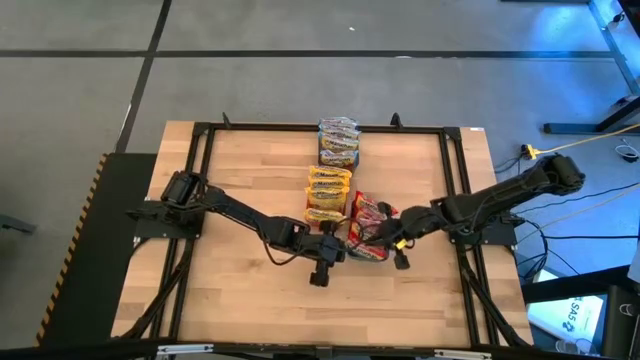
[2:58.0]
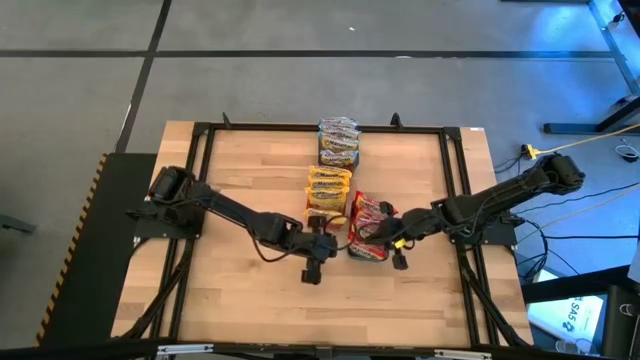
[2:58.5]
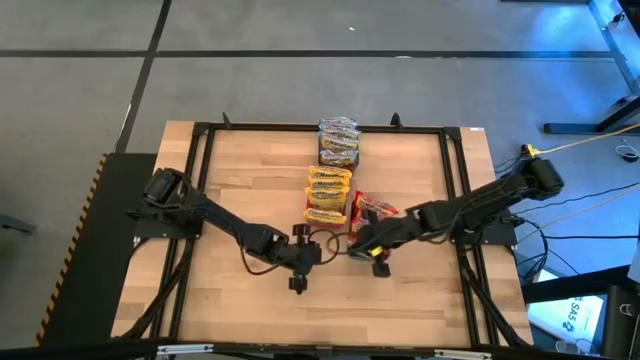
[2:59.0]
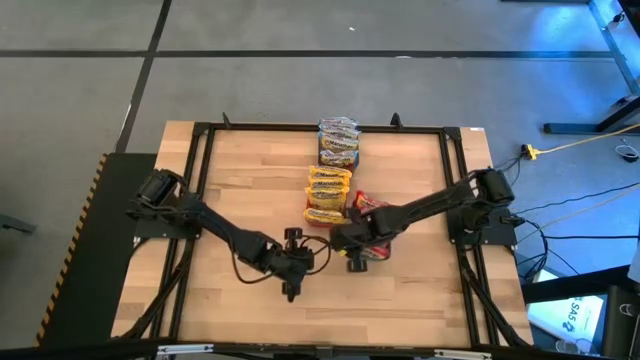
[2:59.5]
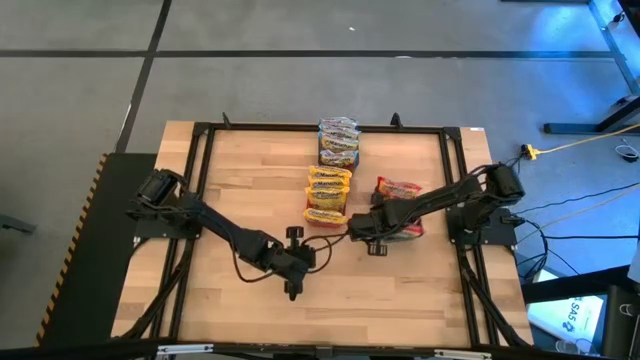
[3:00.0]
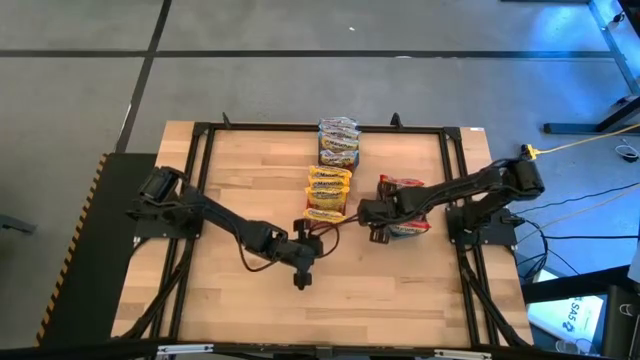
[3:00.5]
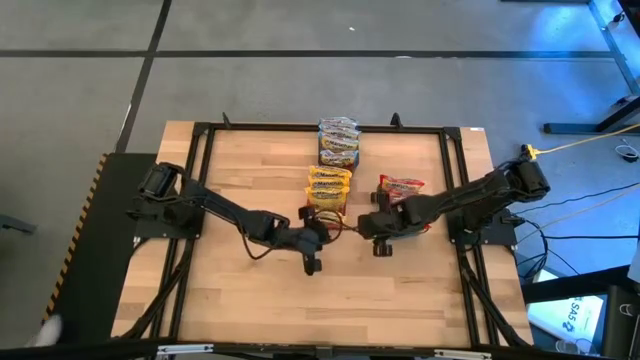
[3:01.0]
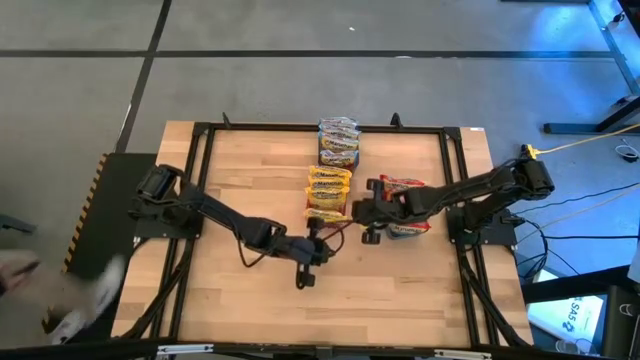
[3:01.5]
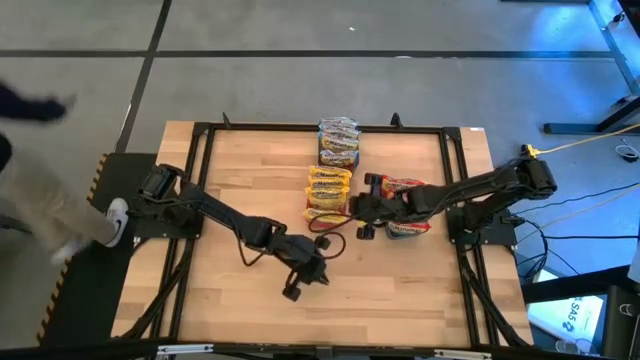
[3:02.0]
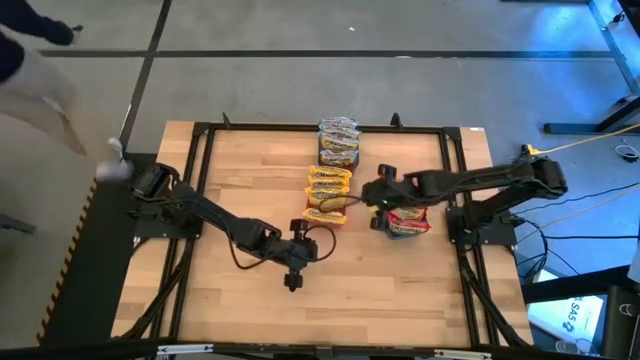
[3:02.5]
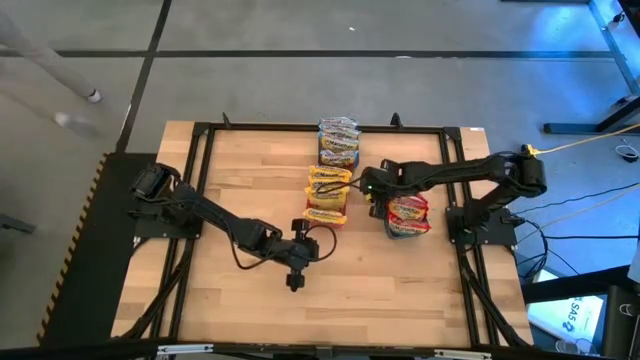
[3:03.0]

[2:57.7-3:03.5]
Task: Sort Maruchan noodles
Move the blue bin to the middle right of the table

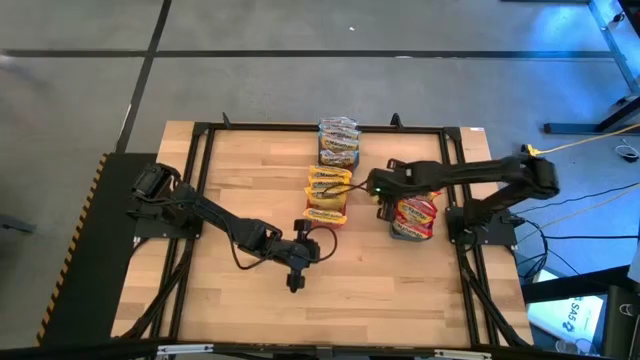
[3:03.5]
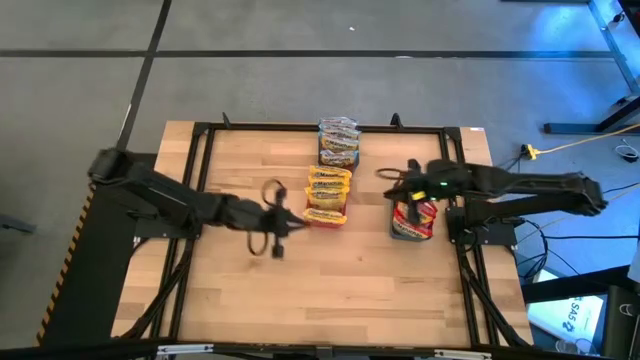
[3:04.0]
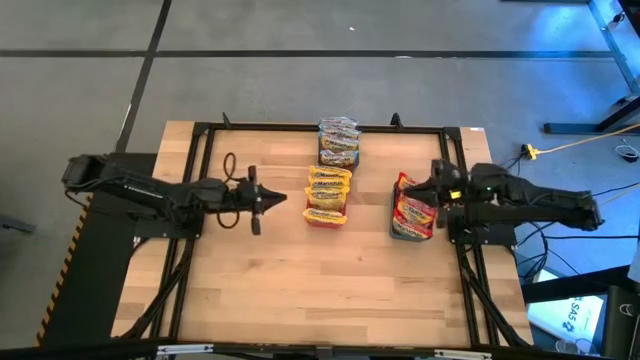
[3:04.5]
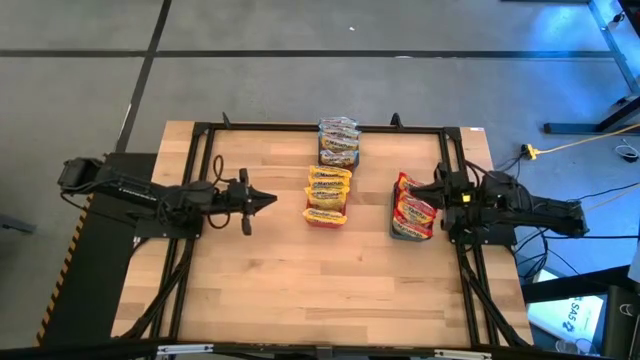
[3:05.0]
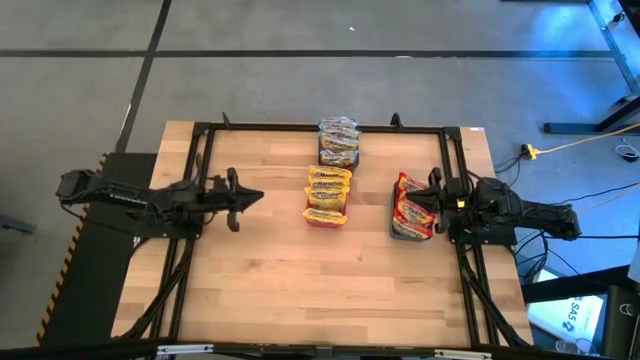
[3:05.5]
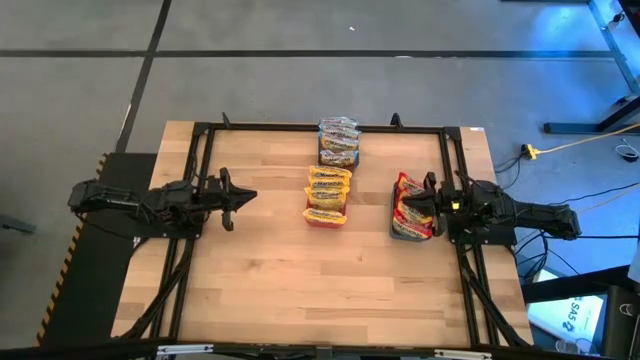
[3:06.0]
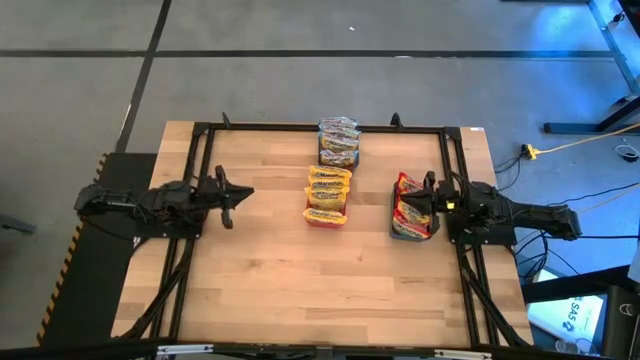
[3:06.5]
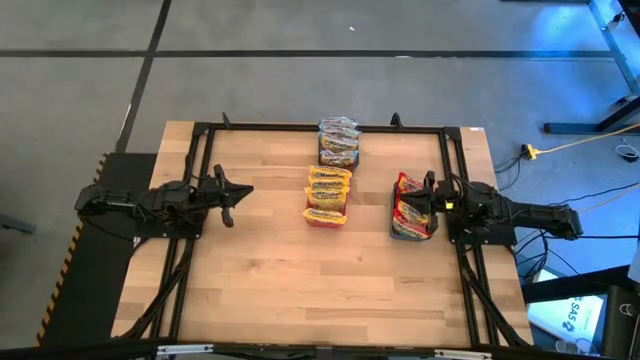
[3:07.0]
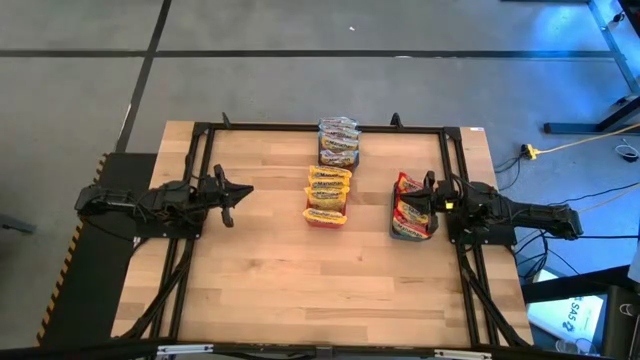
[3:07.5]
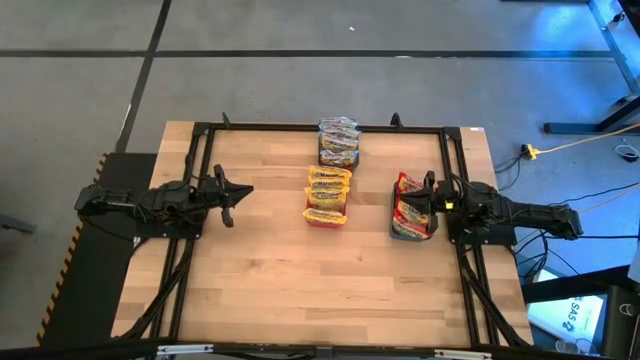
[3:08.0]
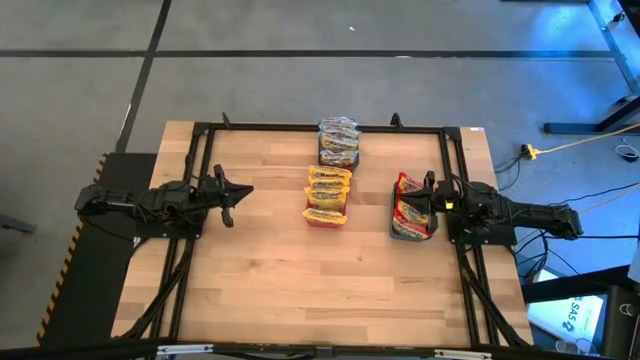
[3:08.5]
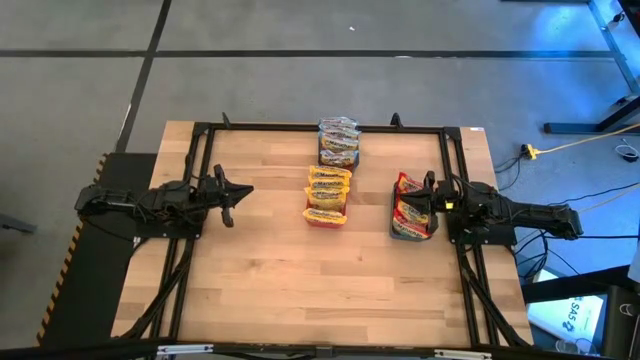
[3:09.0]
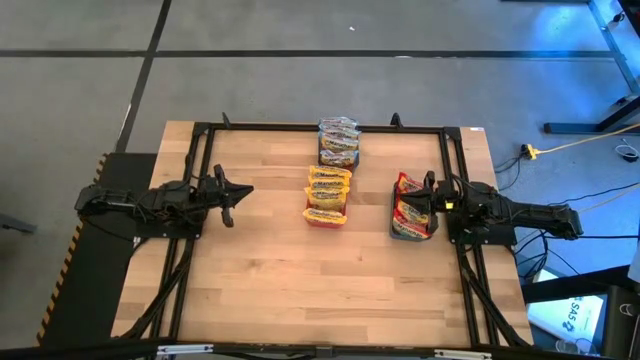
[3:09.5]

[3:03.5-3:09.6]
Return to Home Position

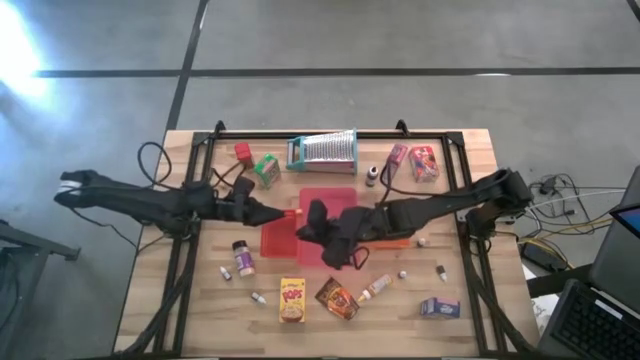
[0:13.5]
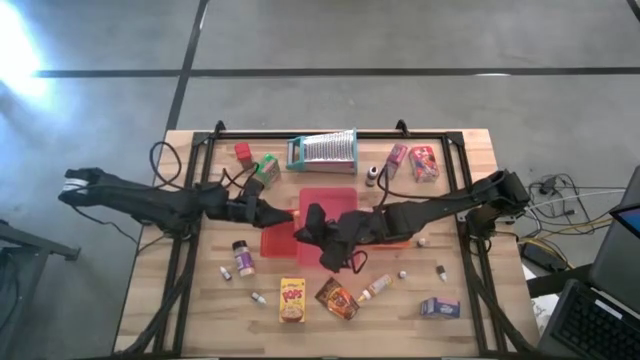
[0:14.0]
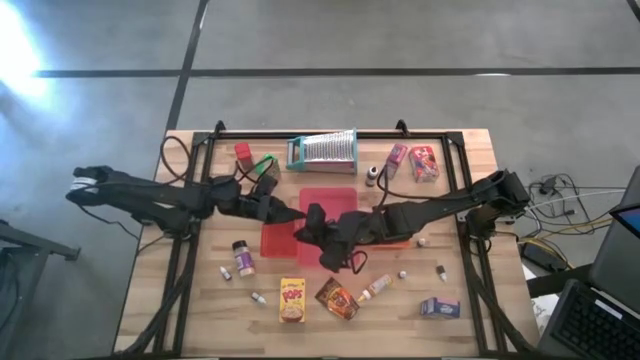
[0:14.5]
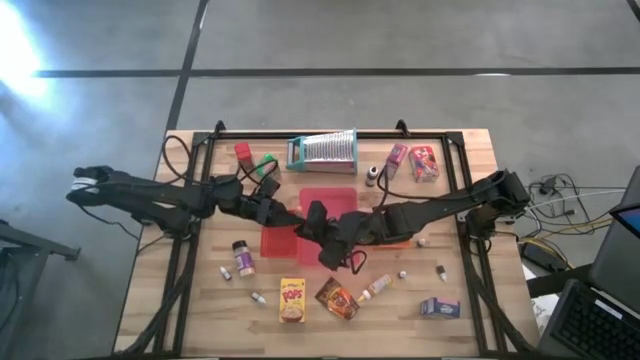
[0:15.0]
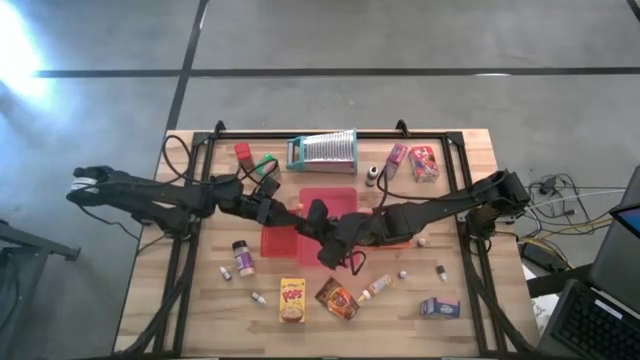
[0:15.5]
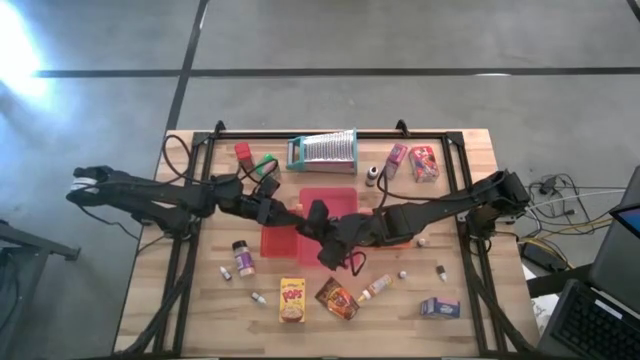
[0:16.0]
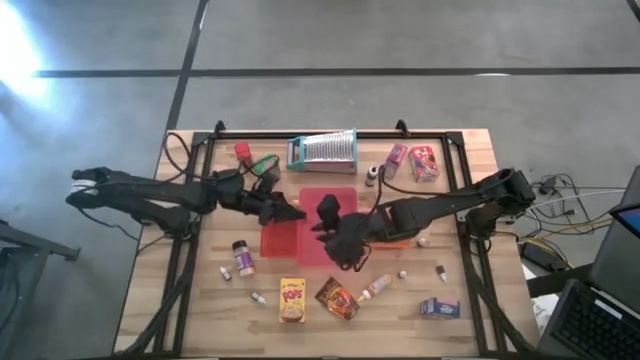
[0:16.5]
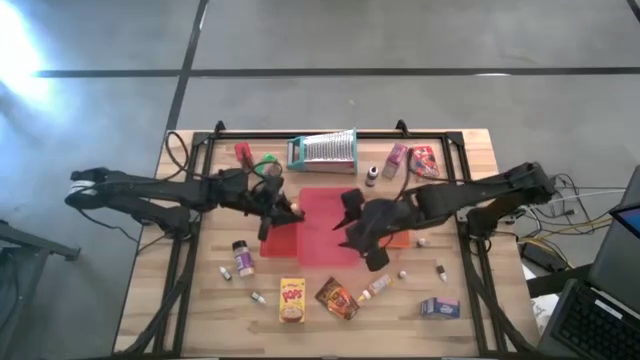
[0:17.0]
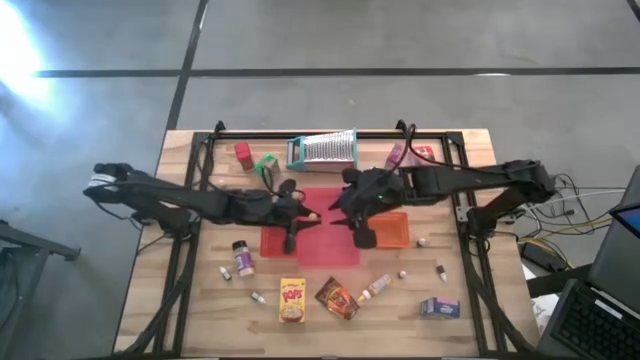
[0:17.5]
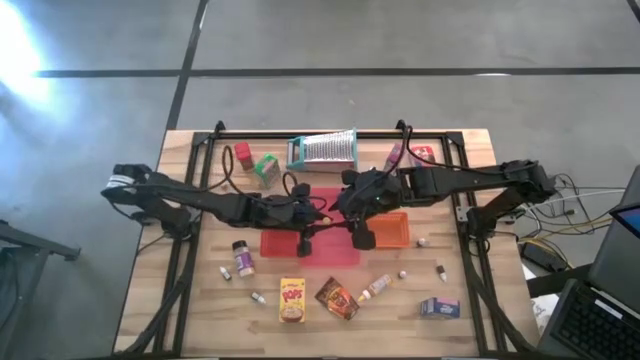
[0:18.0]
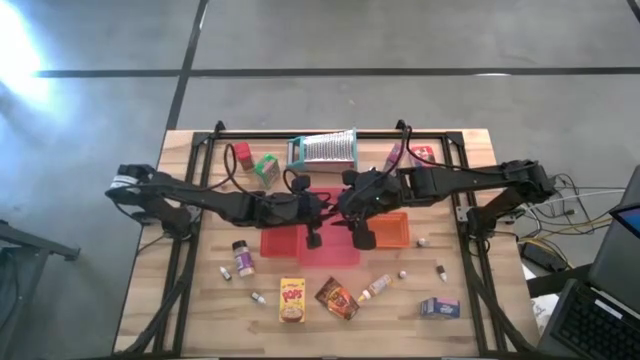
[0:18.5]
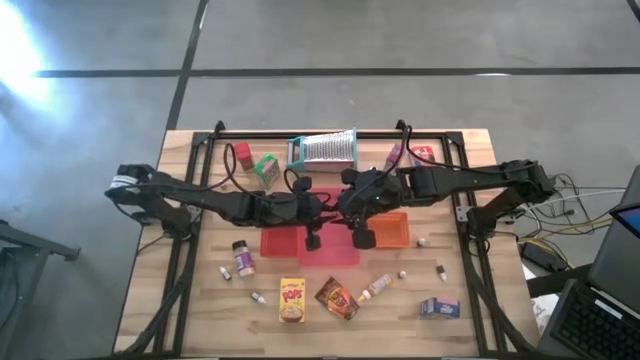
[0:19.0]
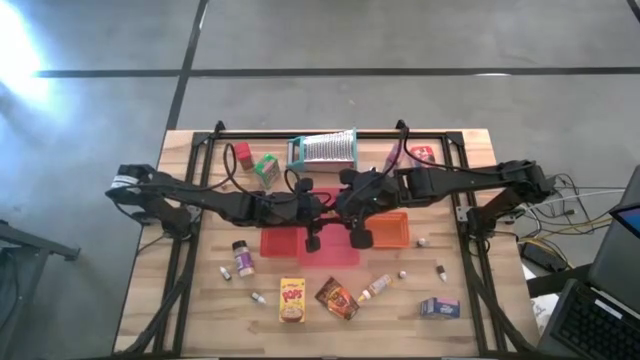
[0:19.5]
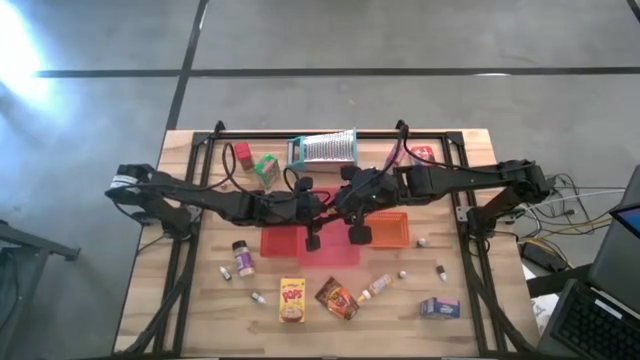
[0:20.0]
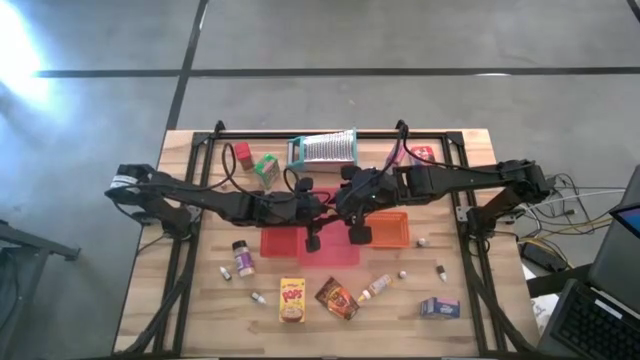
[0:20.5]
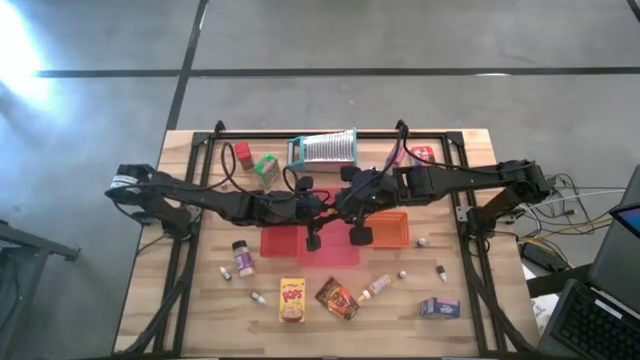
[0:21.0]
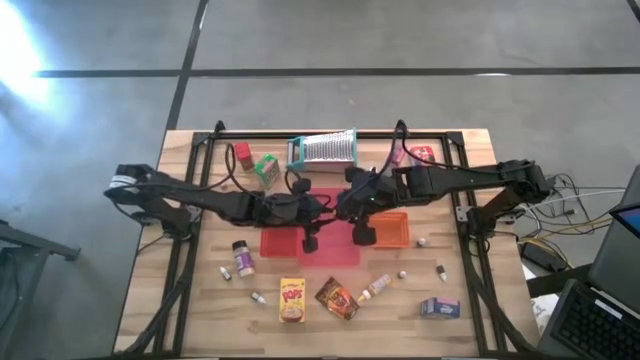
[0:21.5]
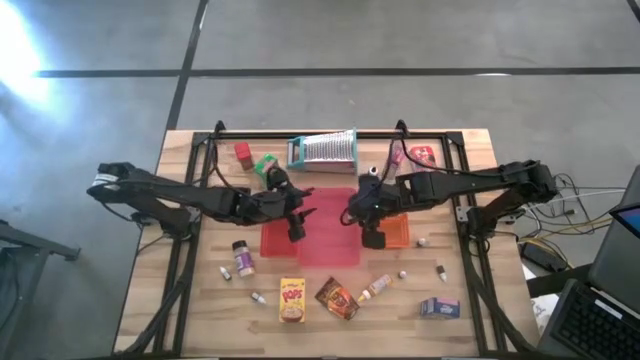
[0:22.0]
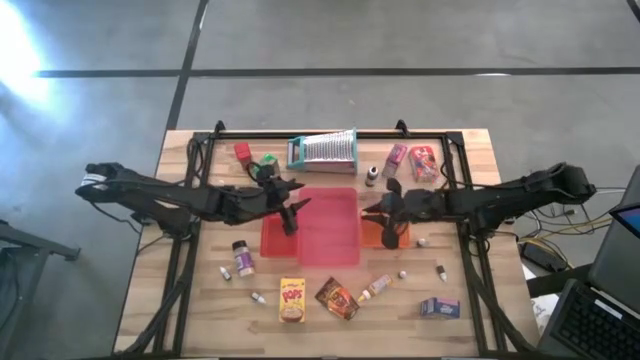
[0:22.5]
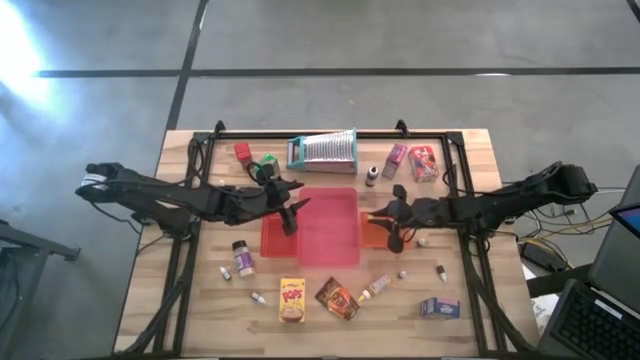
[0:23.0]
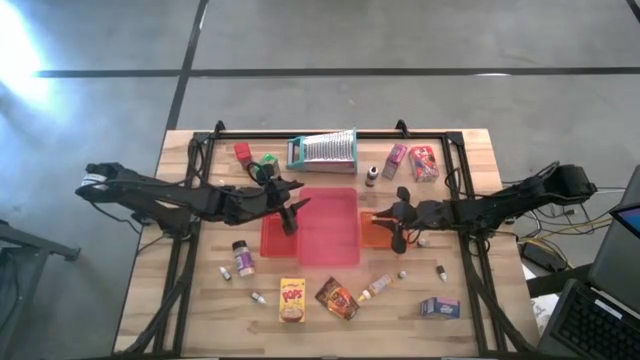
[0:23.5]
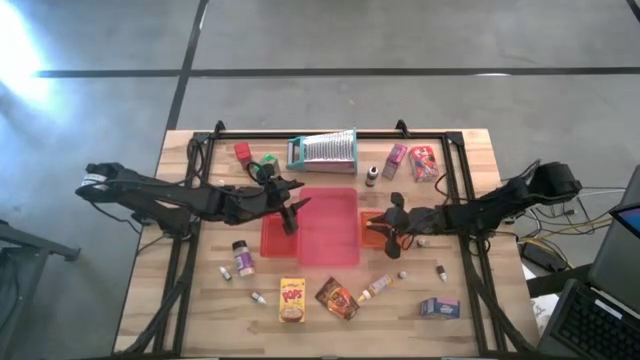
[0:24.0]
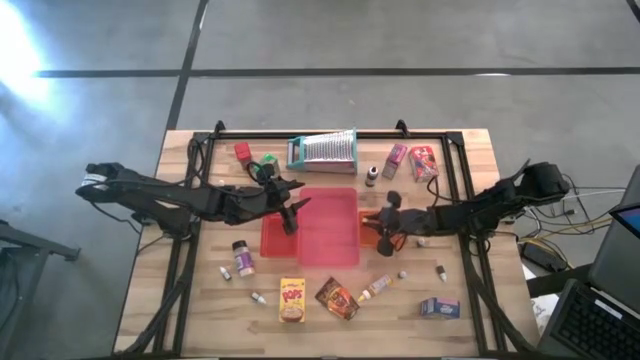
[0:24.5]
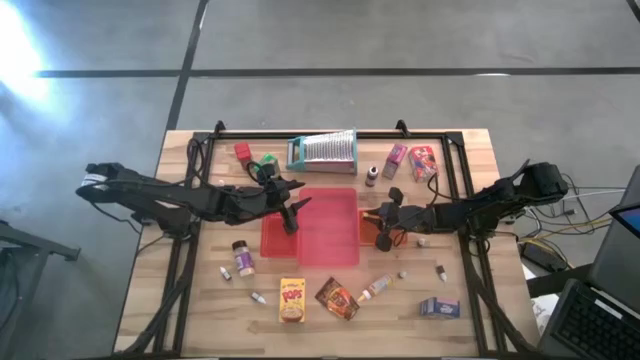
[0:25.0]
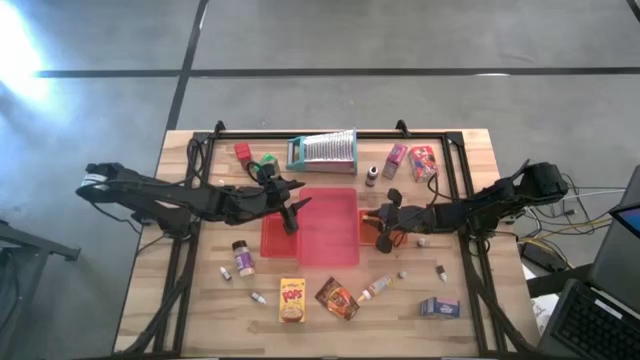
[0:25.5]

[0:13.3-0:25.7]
Task: Pick & Place Kitchen Items
Put the small orange food coloring bottle into the orange bin
